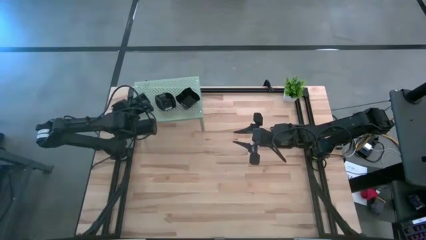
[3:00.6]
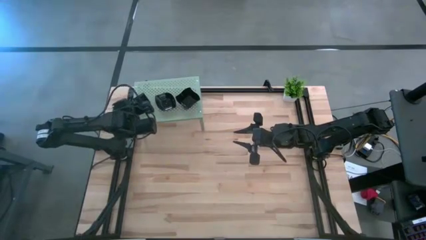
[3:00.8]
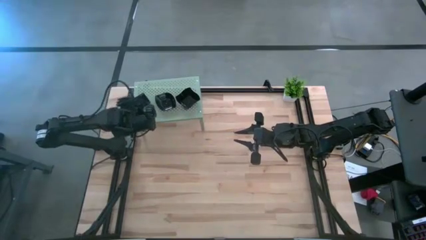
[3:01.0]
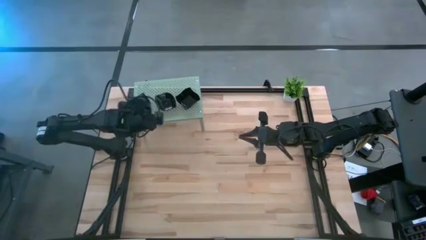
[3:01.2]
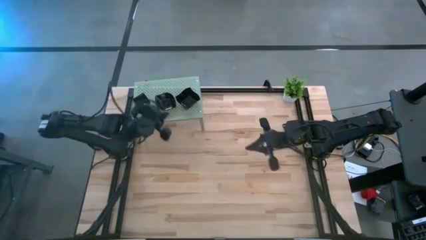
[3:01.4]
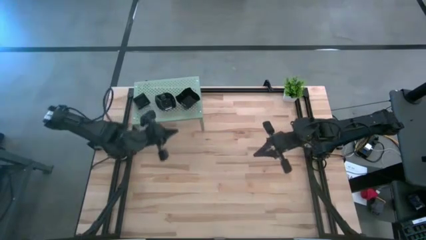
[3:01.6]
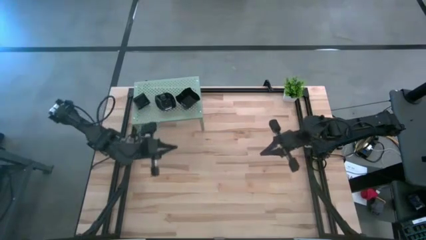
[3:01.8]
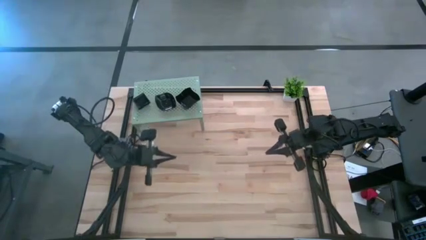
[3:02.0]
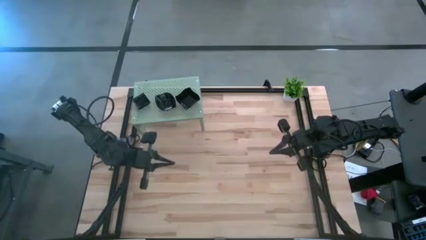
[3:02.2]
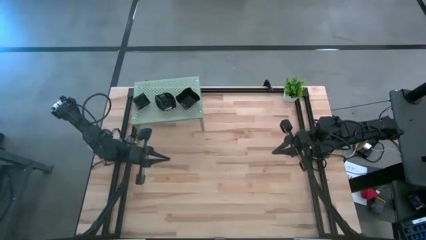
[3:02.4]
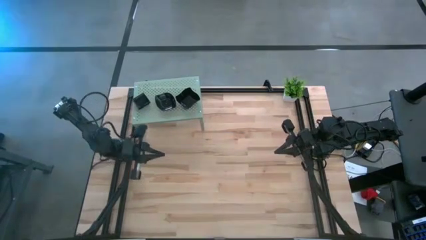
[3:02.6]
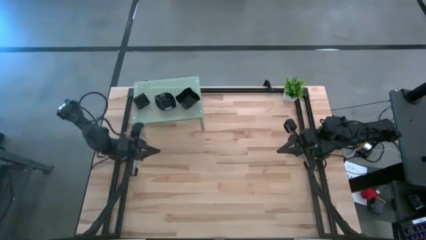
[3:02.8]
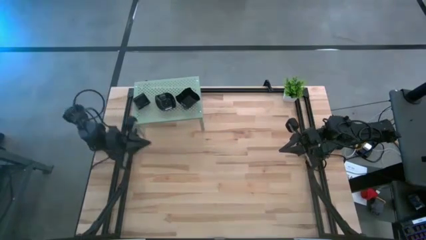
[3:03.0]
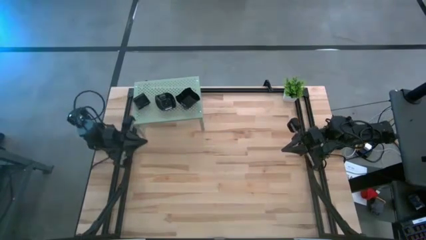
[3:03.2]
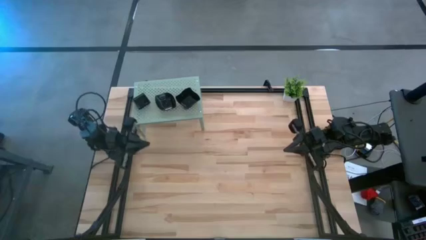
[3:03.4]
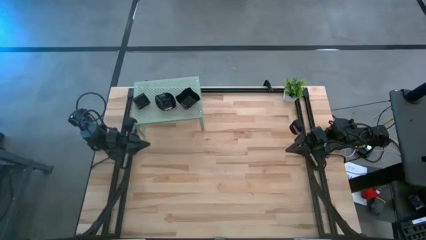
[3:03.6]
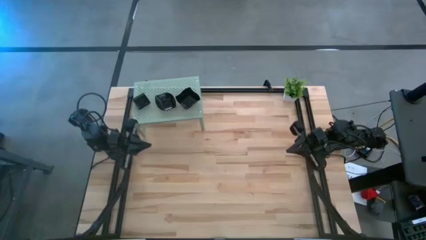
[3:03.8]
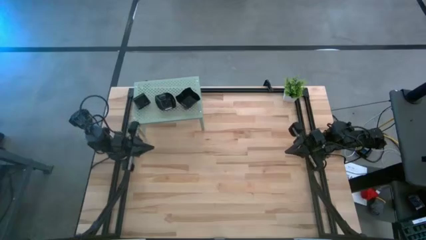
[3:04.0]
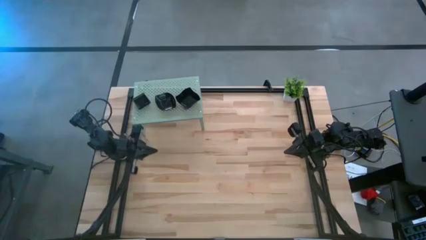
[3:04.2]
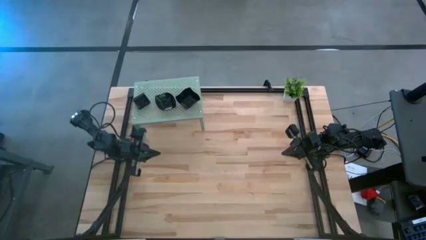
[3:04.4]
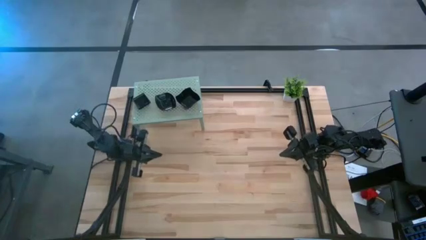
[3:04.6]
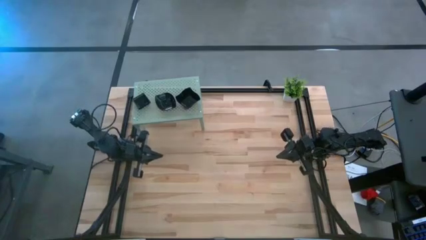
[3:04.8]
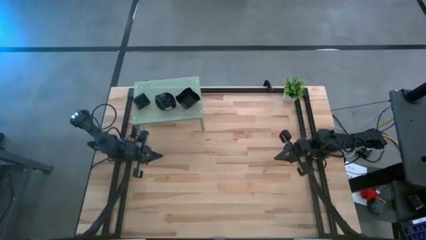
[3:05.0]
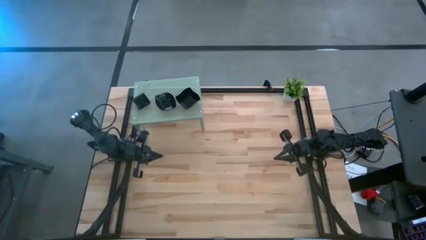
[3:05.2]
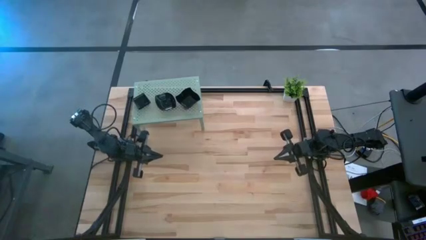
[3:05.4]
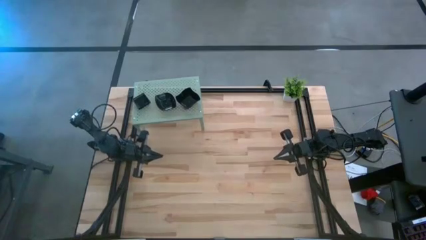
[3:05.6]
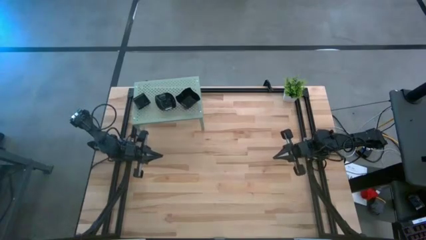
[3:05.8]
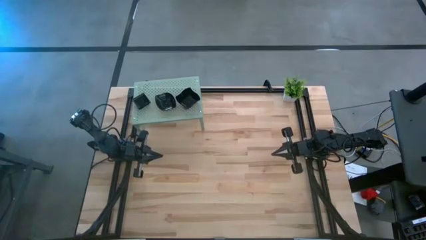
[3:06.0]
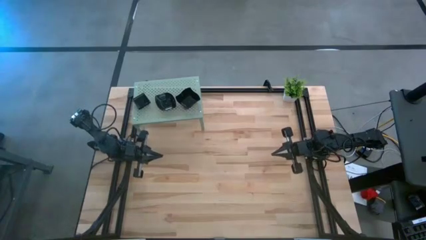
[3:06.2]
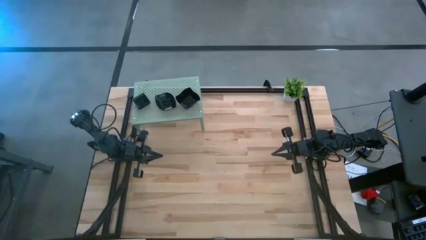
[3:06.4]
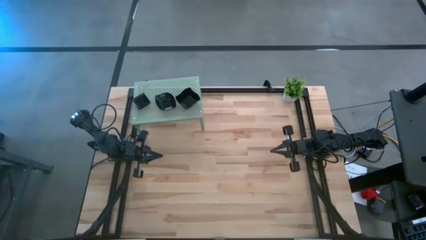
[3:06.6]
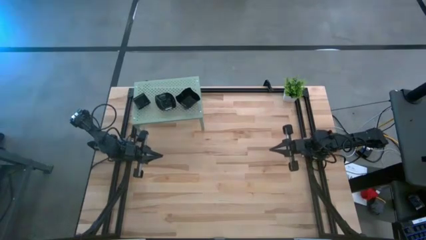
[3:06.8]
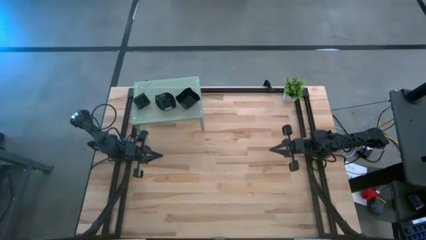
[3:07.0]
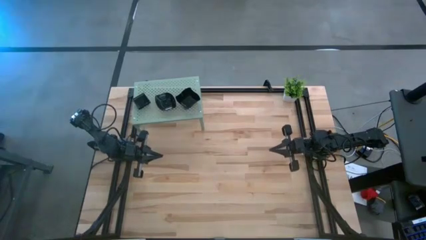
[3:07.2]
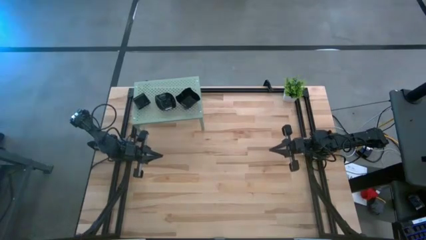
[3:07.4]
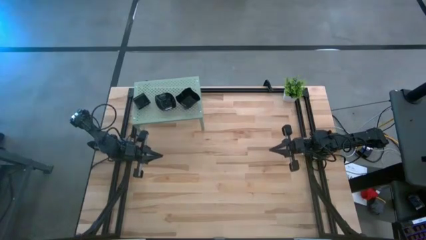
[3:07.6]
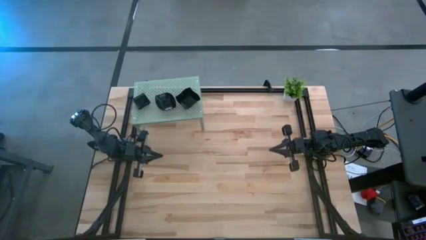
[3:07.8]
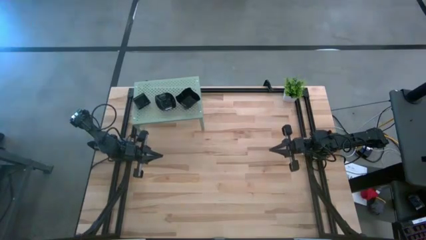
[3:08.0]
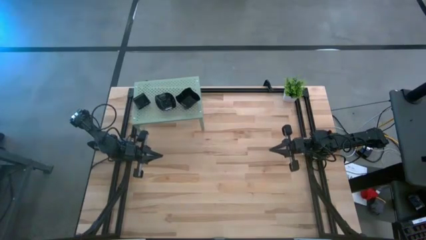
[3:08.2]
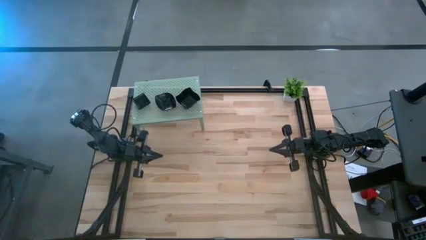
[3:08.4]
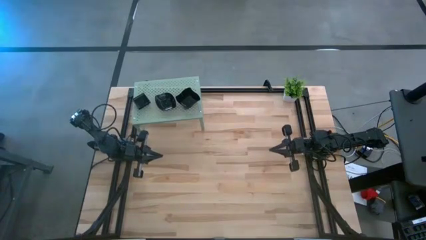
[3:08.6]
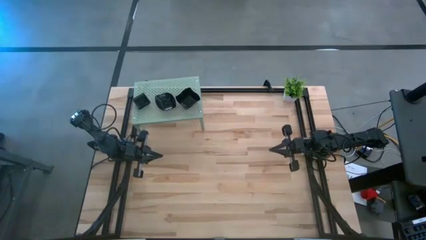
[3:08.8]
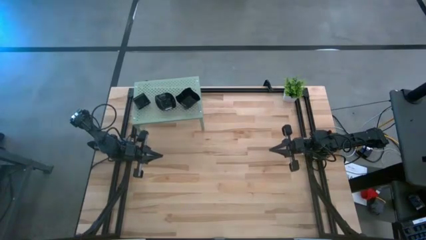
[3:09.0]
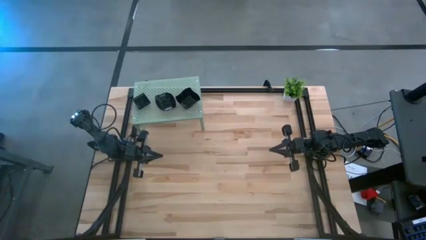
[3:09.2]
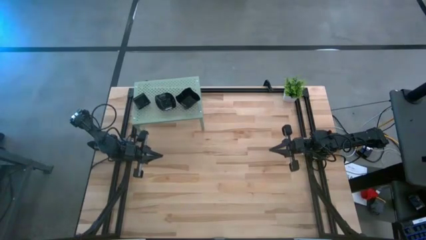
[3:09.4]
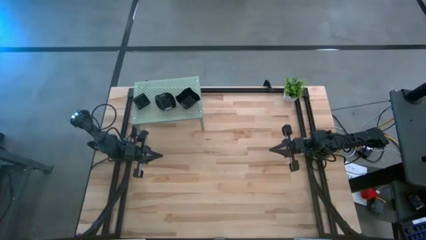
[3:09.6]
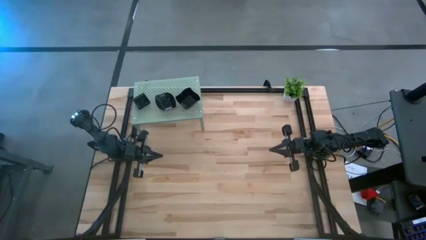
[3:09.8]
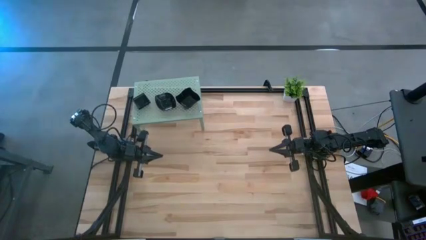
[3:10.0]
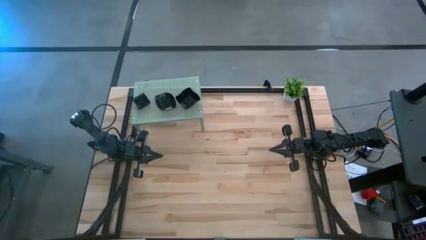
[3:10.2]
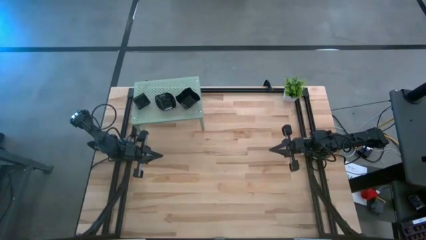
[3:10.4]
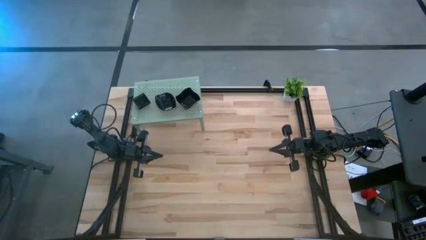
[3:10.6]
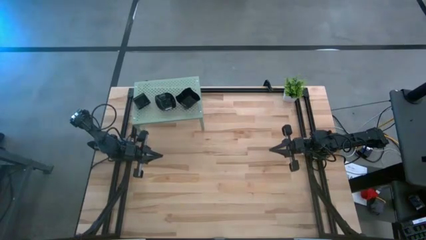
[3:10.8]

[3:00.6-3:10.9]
Task: Pick & Place Mini shaped plates
Return to Home Position
